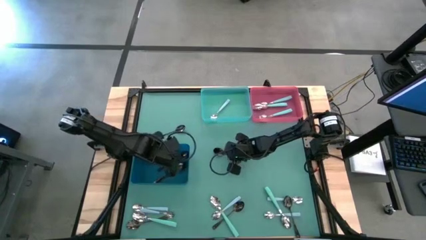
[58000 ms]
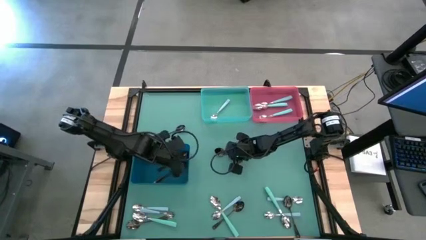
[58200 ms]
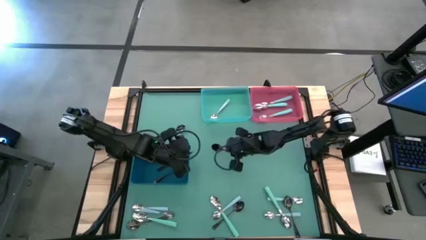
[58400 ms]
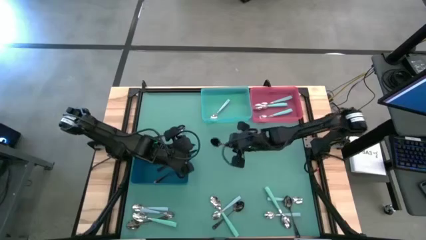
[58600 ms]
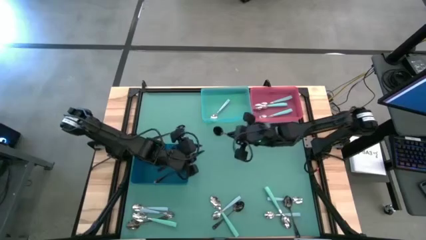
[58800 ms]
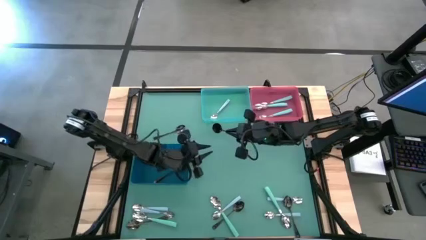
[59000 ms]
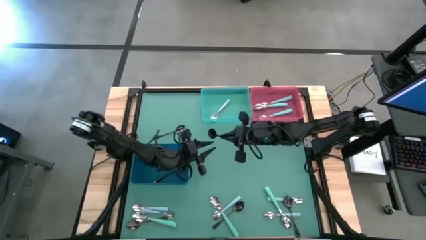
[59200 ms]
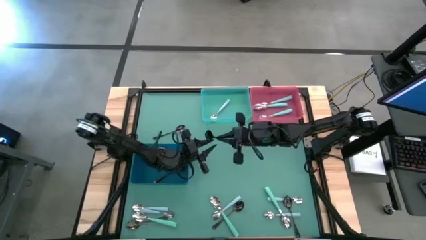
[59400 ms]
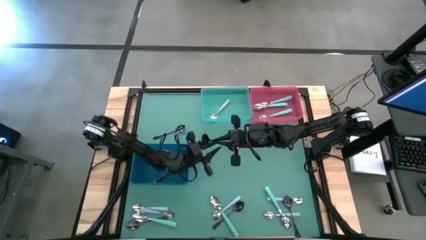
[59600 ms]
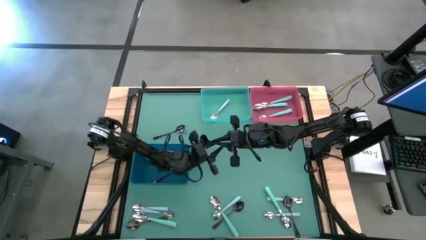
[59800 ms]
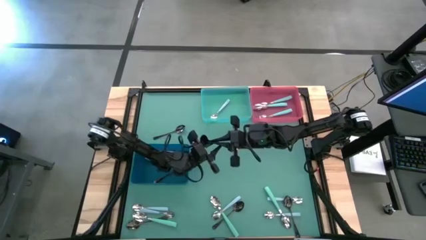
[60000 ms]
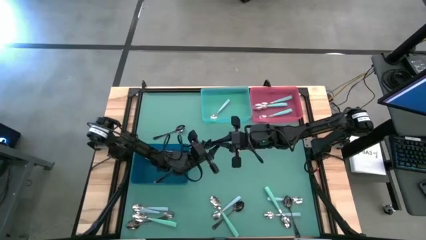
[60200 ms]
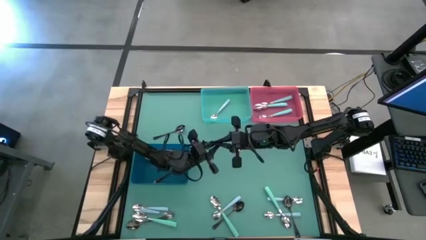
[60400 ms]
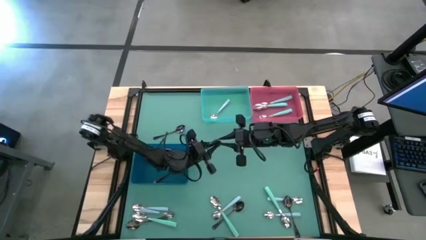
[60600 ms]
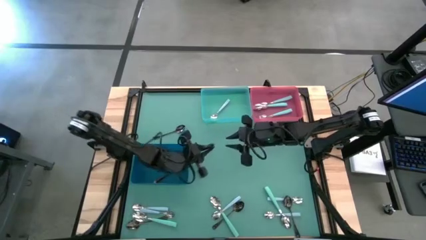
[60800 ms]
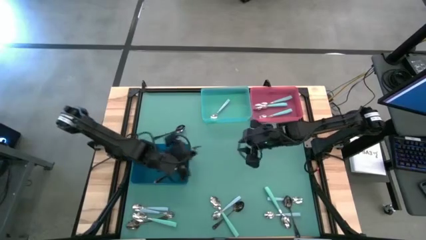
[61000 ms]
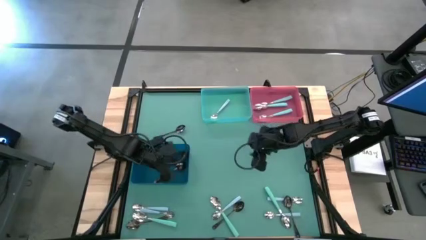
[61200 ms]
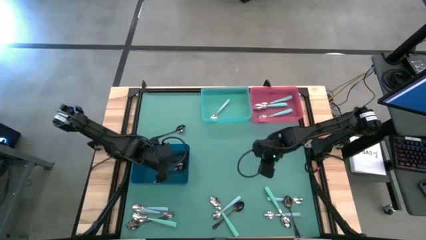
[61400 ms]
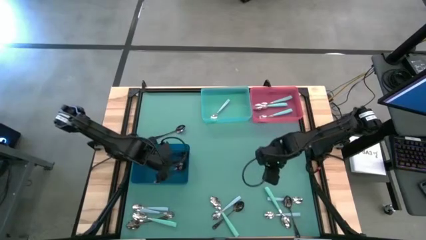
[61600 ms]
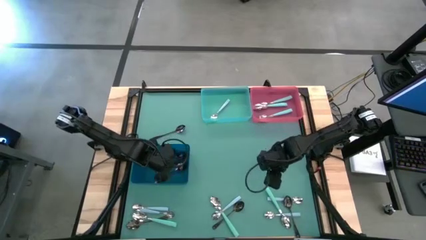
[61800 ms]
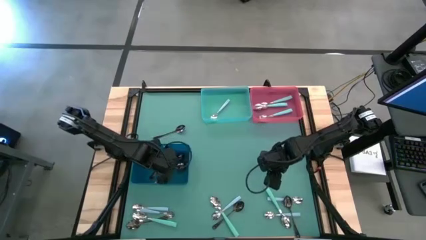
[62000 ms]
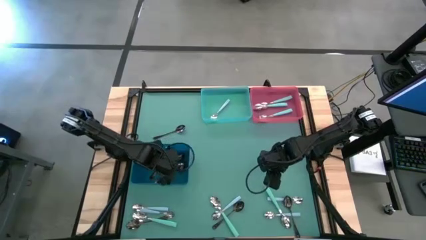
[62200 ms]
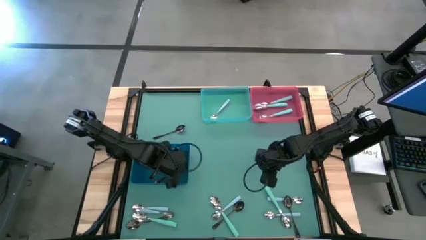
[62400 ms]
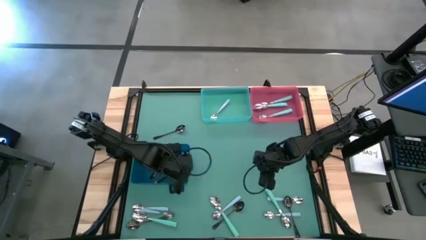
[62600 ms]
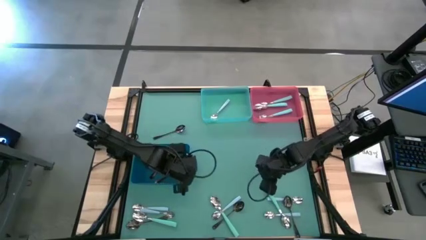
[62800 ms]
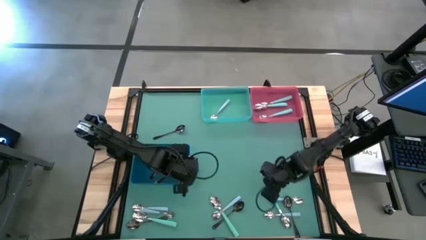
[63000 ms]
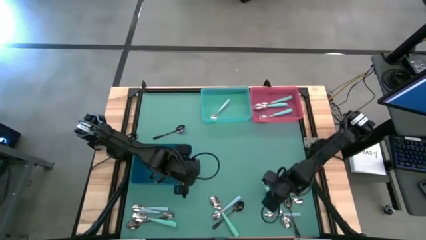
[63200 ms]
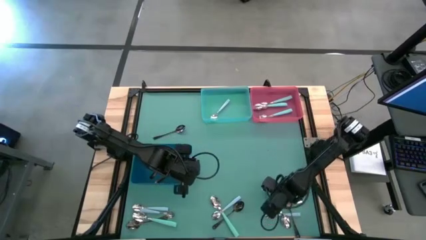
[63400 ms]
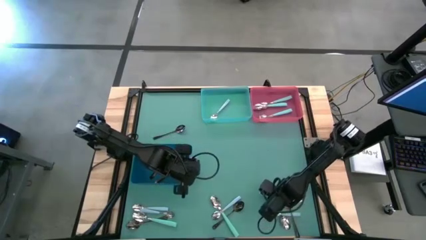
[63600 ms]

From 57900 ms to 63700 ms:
Task: Sort silverware by color (type)
Put the center black spoon into the dark blue bin

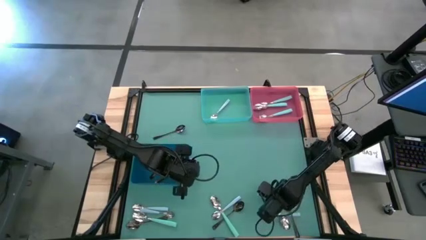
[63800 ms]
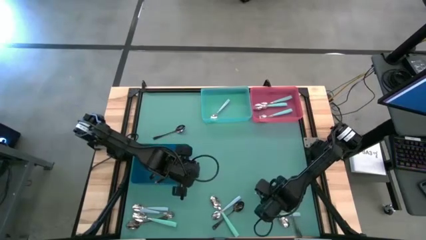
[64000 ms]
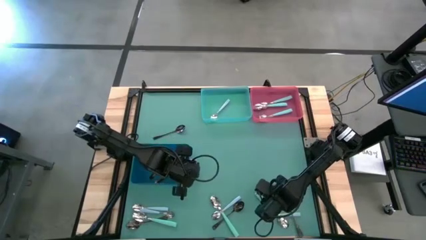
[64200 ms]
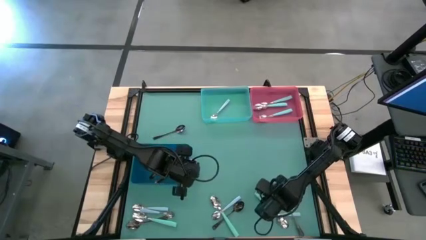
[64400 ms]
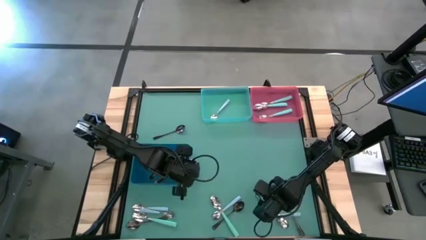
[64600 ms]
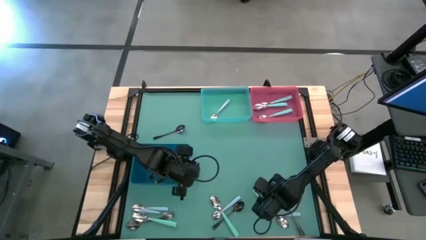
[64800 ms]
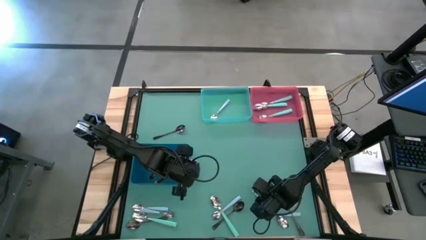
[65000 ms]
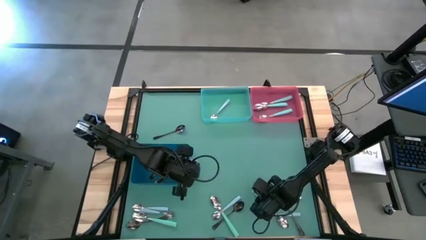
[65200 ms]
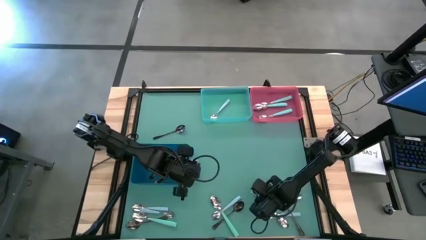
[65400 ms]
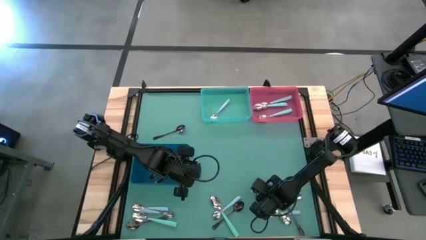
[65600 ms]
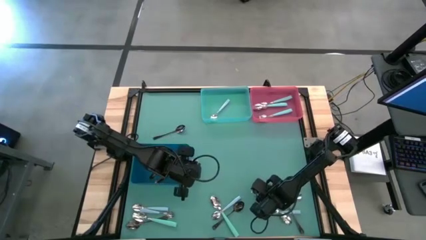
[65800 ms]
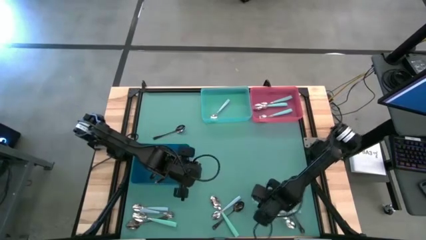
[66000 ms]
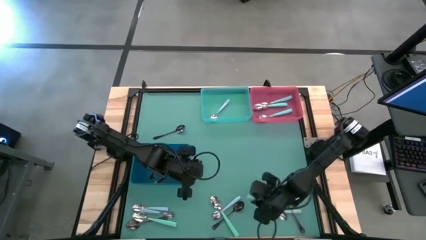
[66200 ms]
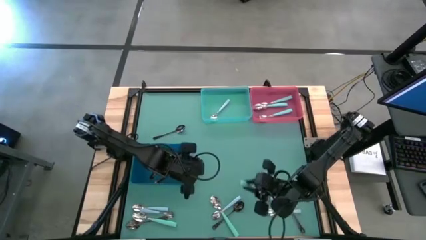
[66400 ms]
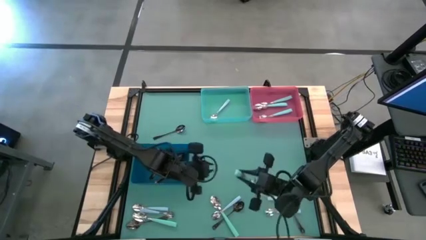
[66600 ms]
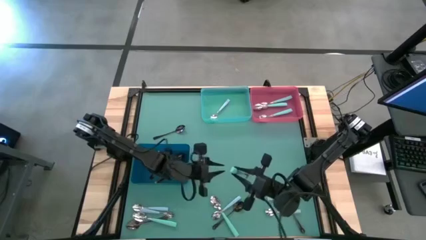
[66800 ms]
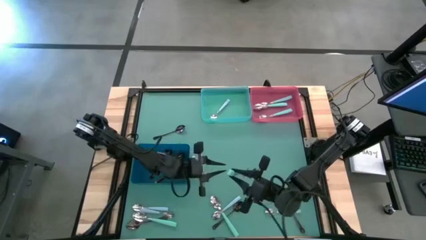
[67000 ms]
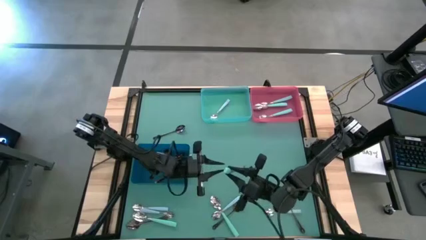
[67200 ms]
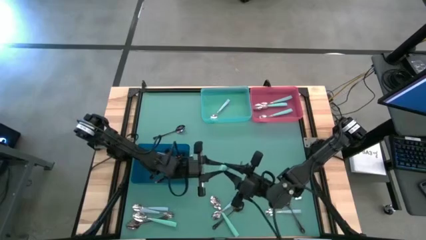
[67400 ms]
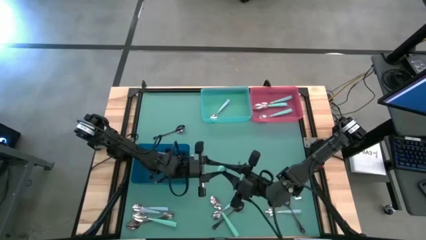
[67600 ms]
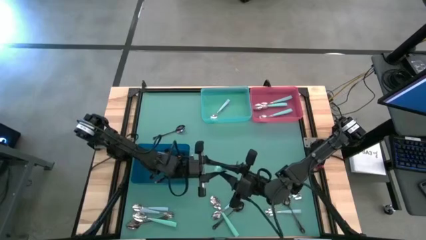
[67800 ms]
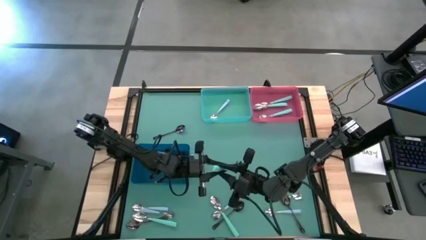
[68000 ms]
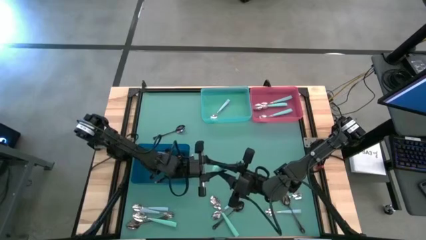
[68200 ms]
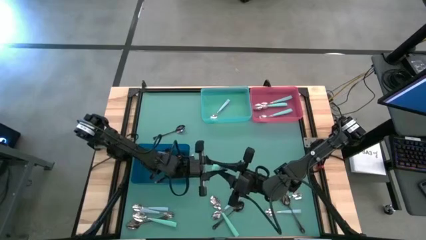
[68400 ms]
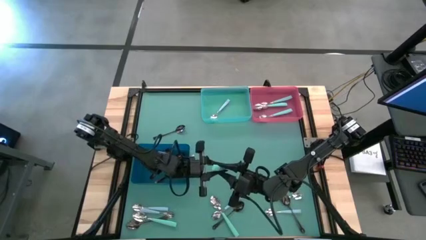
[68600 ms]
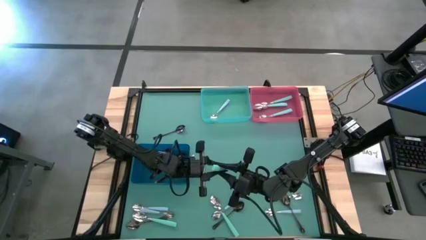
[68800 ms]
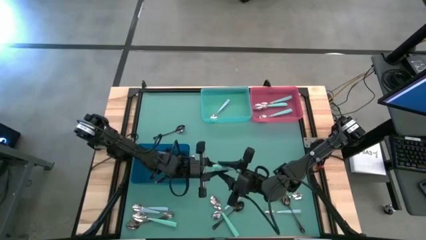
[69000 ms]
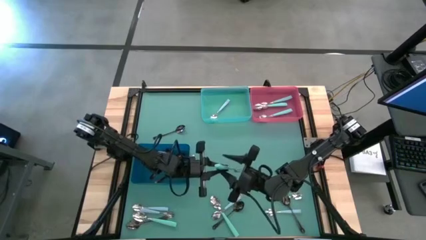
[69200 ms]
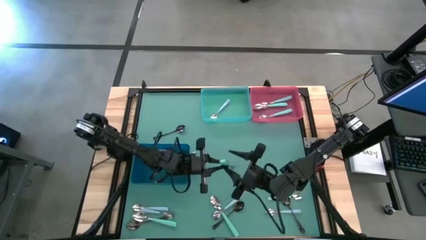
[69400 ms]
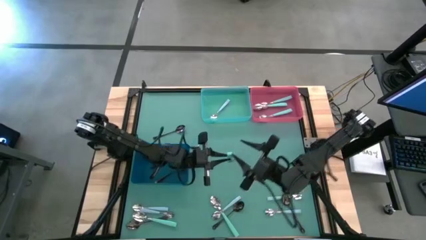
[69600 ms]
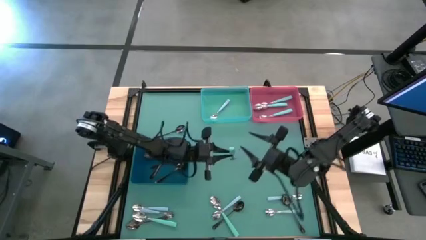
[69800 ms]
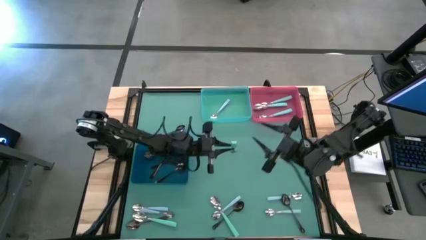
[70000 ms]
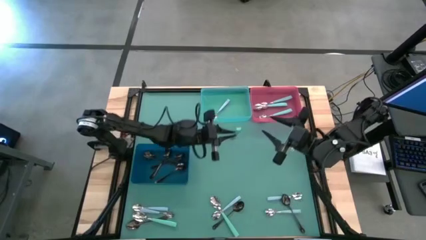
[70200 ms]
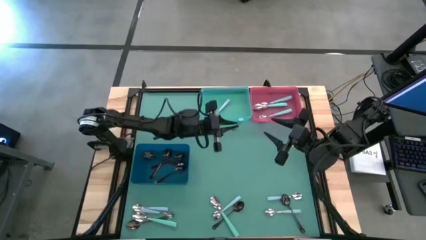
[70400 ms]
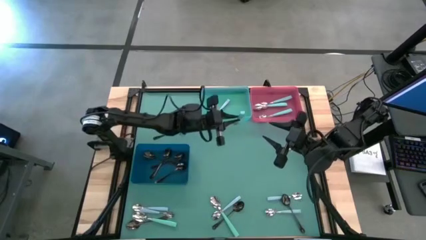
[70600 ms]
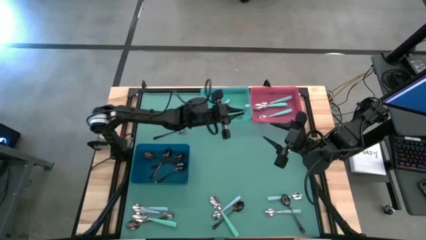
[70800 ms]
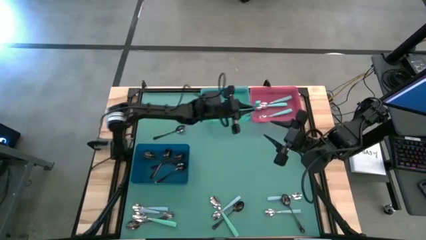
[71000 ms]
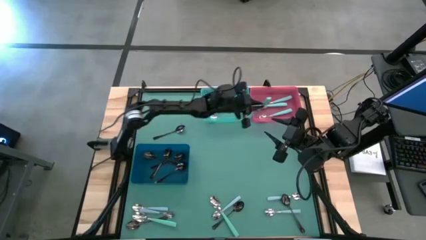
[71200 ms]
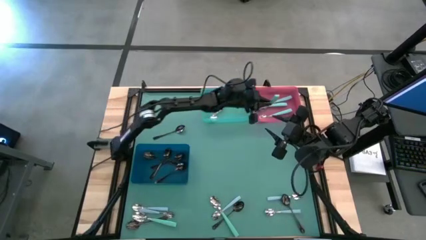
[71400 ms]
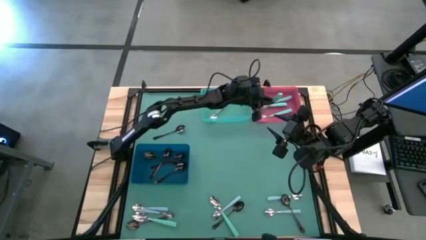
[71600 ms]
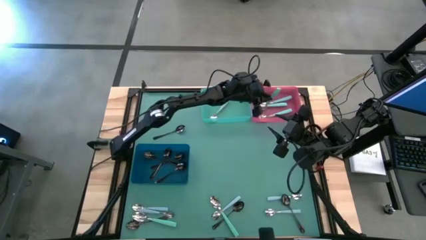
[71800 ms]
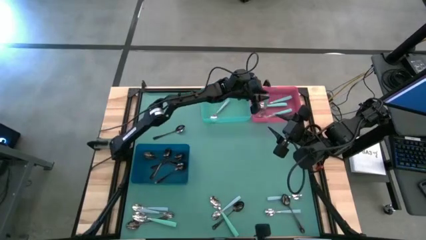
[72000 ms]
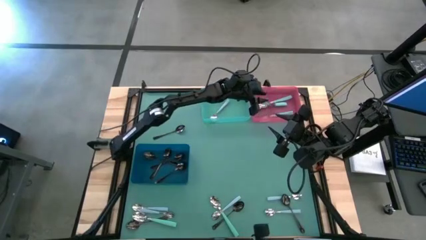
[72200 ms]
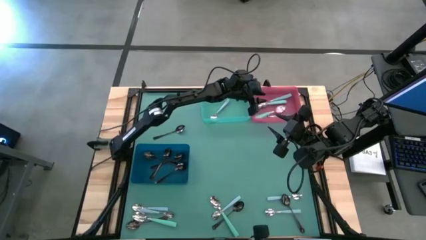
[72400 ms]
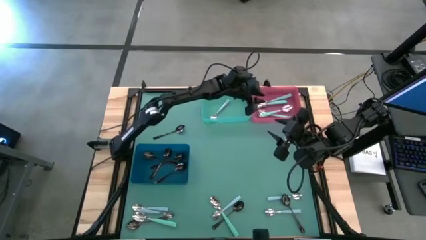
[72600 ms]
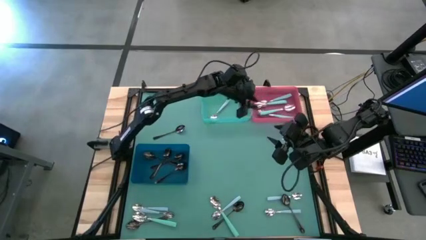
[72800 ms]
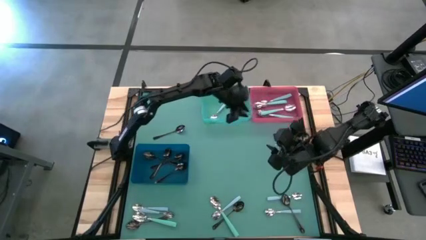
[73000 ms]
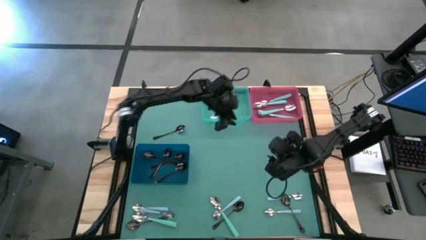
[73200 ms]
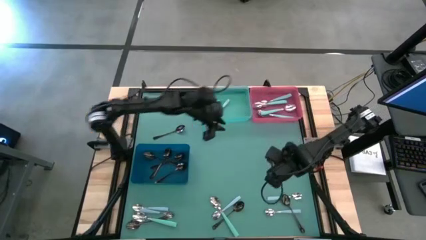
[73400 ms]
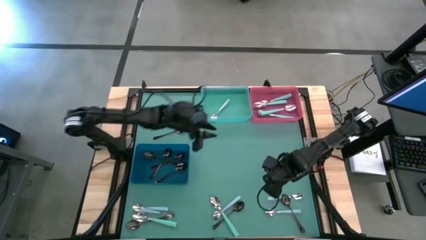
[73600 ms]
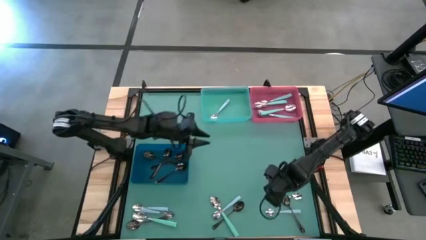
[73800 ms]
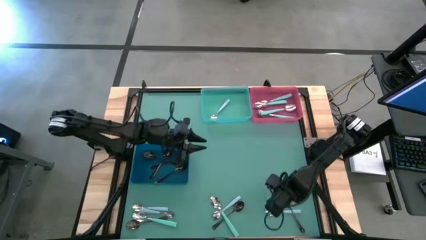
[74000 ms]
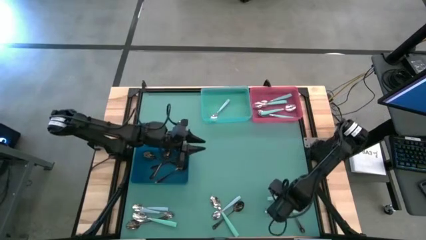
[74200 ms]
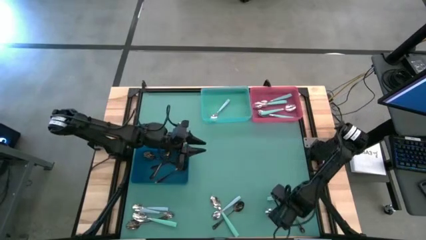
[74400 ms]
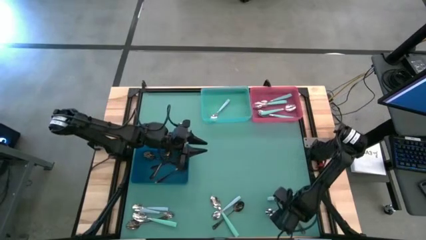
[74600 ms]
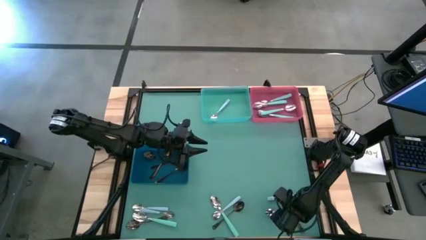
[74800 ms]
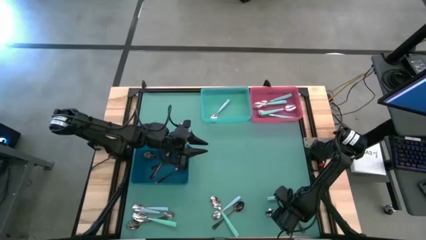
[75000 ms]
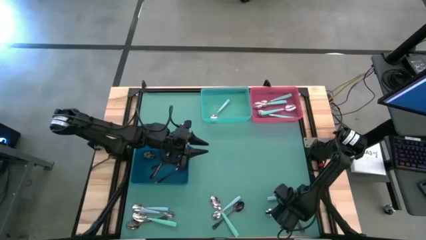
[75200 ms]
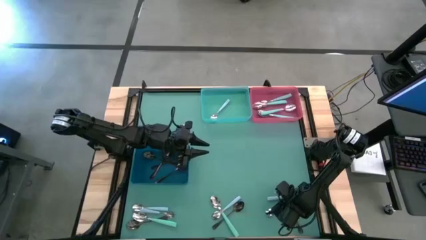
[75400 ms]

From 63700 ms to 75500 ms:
Put the right green spoon into the red bin
